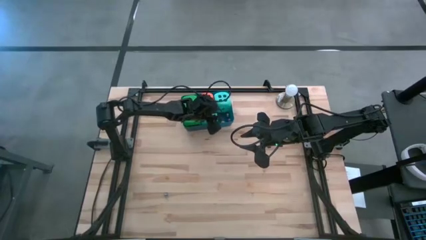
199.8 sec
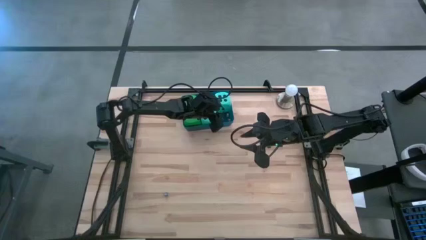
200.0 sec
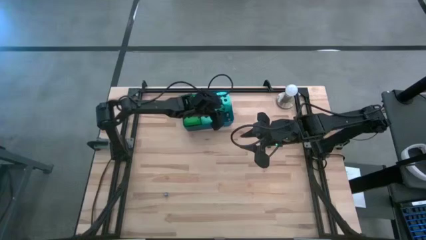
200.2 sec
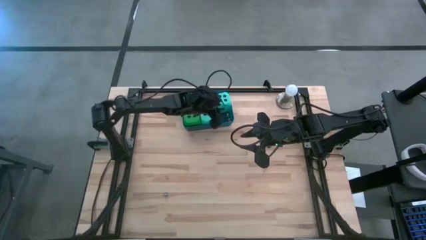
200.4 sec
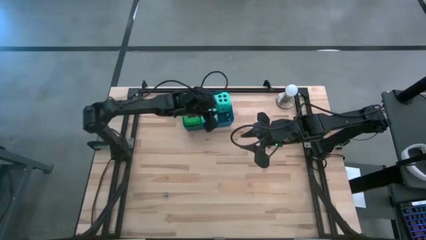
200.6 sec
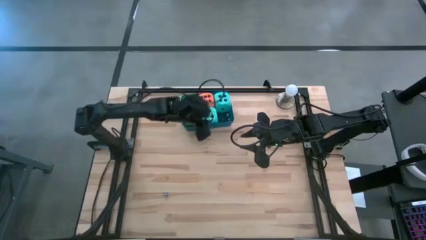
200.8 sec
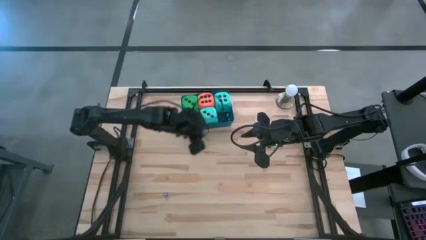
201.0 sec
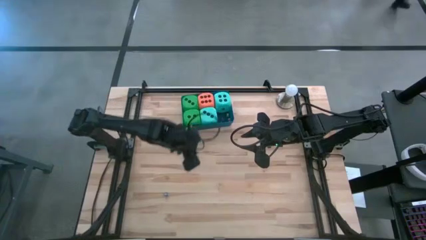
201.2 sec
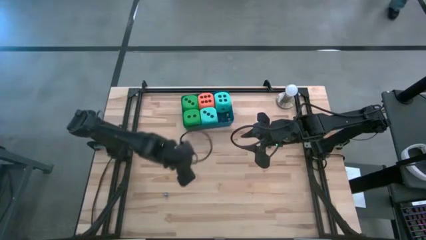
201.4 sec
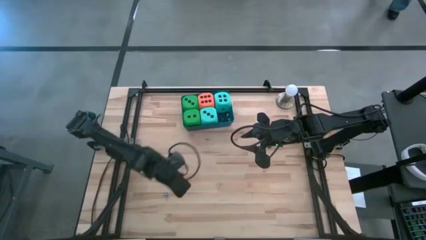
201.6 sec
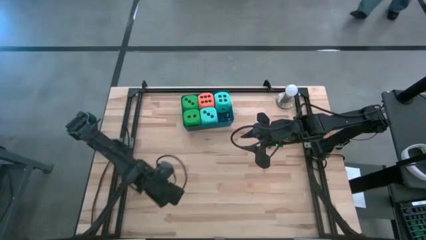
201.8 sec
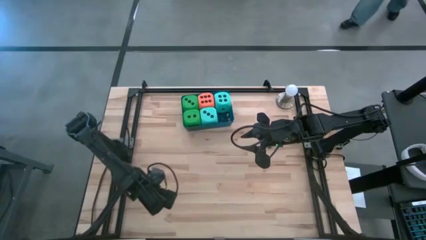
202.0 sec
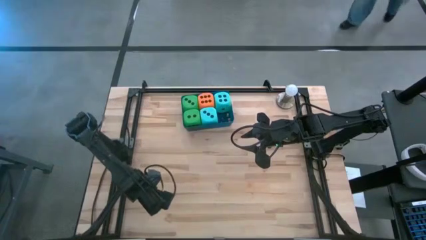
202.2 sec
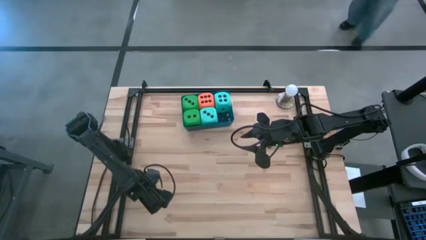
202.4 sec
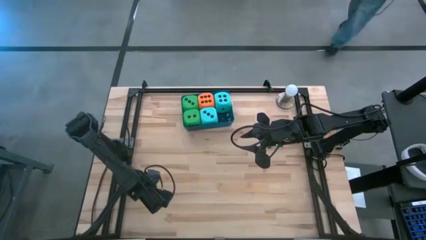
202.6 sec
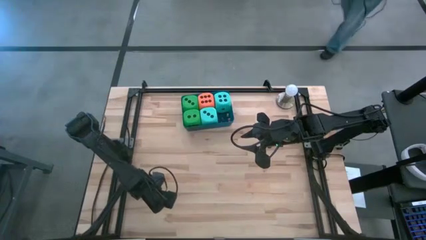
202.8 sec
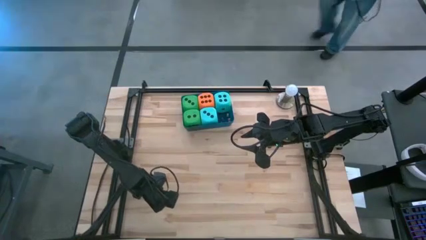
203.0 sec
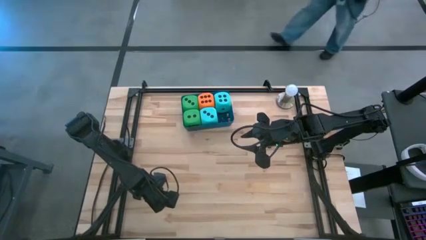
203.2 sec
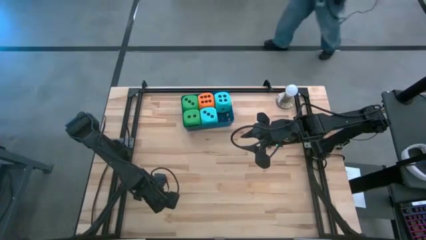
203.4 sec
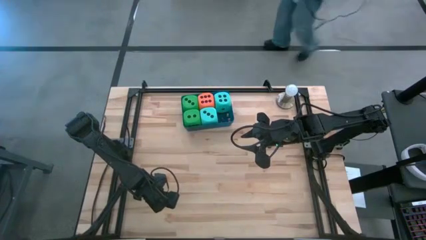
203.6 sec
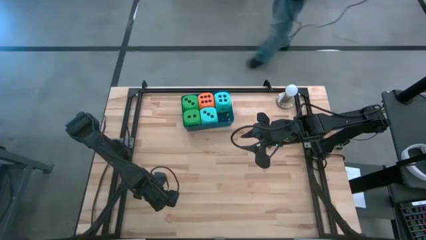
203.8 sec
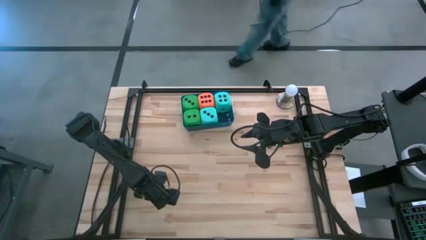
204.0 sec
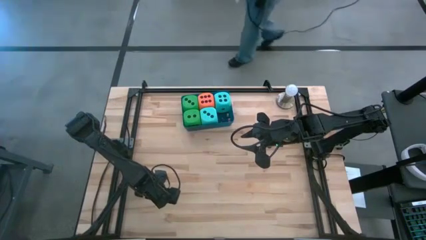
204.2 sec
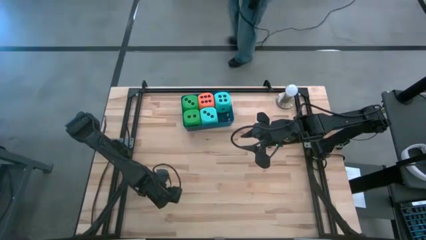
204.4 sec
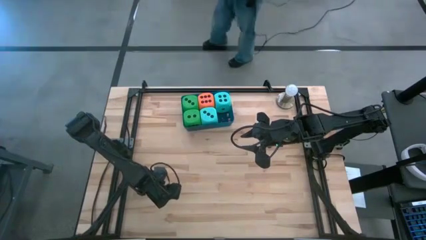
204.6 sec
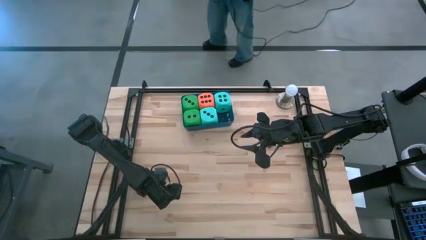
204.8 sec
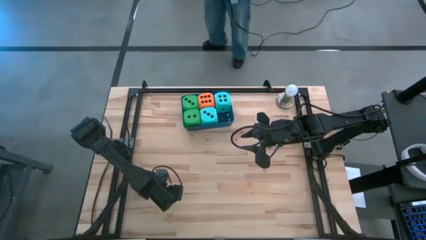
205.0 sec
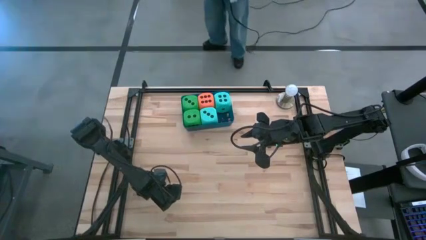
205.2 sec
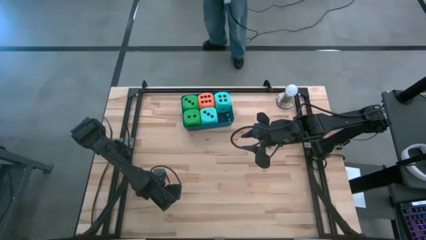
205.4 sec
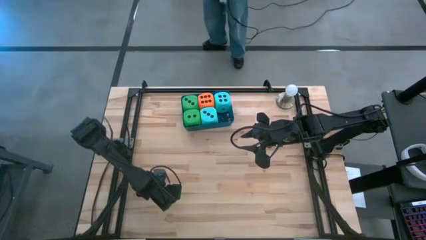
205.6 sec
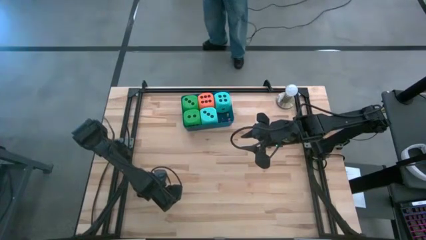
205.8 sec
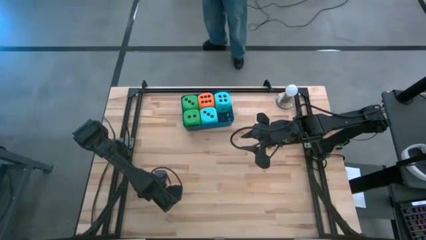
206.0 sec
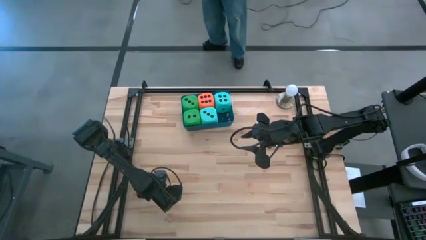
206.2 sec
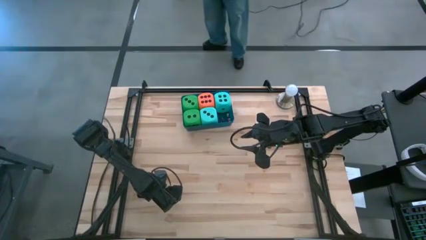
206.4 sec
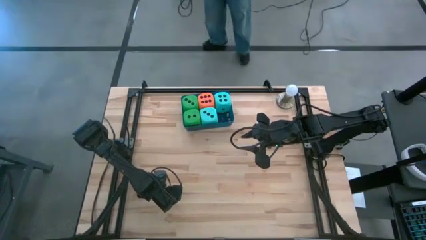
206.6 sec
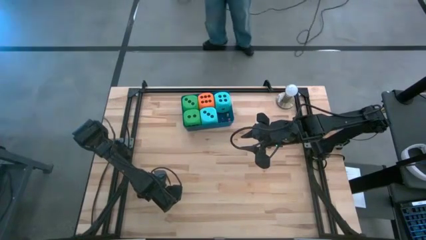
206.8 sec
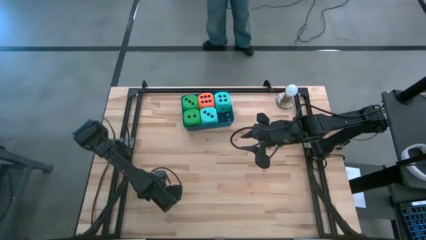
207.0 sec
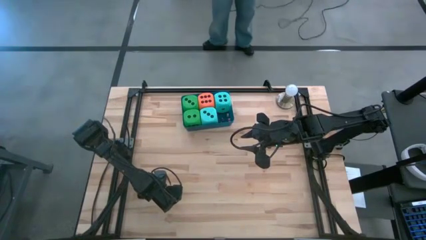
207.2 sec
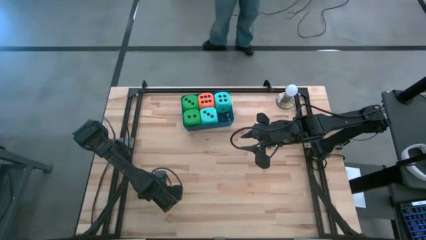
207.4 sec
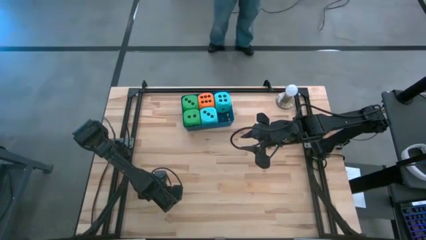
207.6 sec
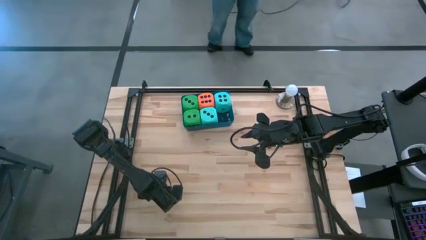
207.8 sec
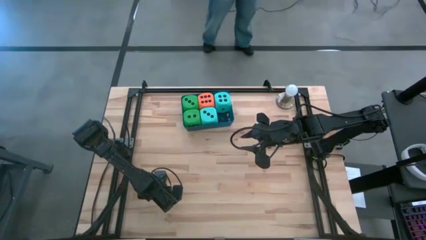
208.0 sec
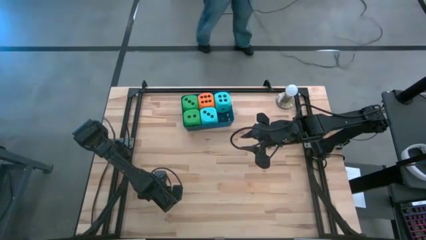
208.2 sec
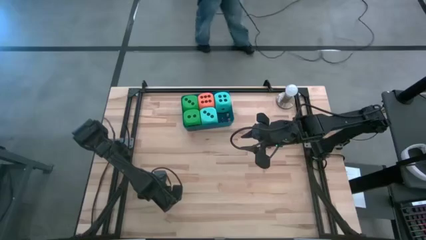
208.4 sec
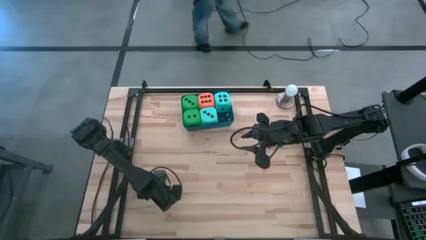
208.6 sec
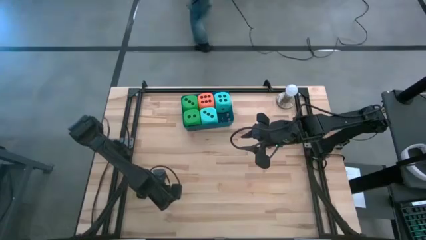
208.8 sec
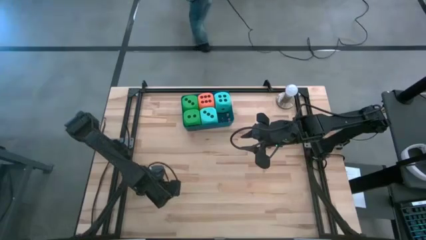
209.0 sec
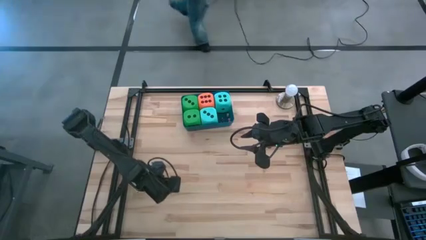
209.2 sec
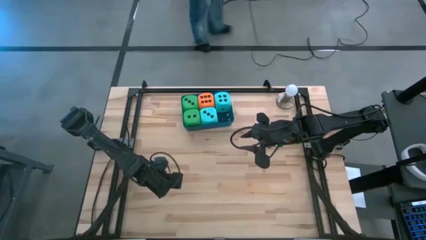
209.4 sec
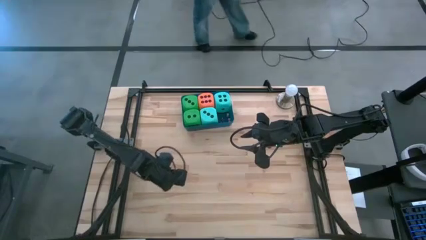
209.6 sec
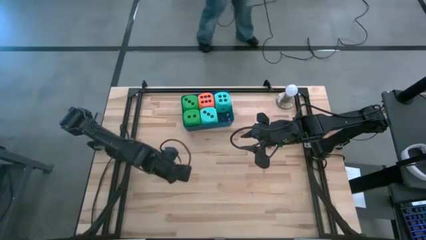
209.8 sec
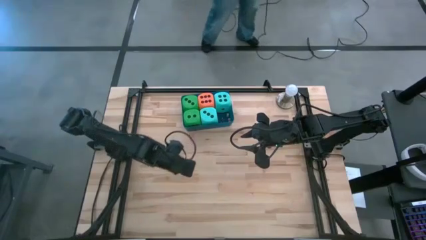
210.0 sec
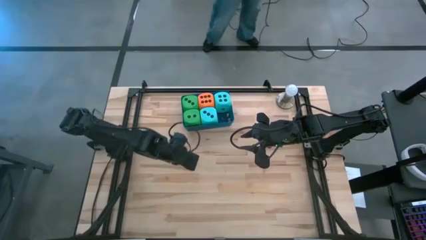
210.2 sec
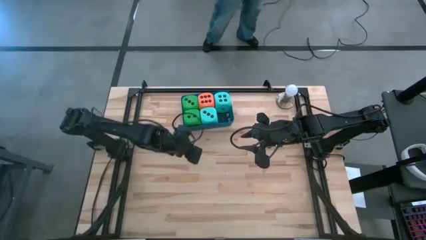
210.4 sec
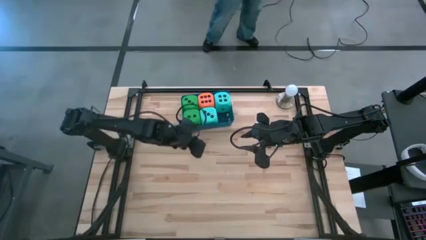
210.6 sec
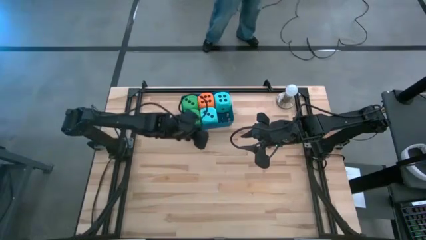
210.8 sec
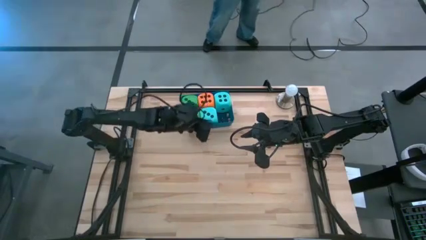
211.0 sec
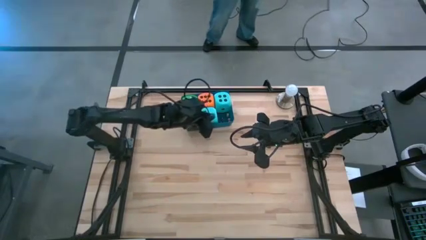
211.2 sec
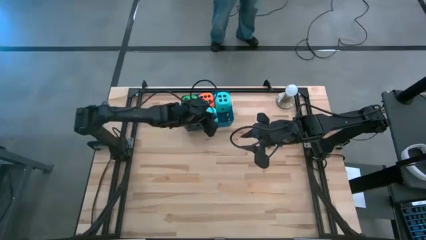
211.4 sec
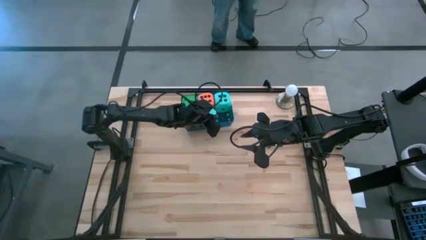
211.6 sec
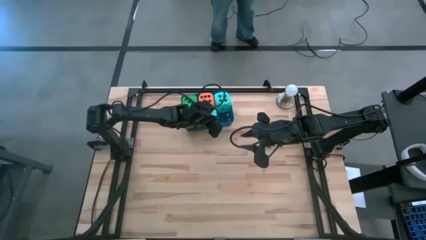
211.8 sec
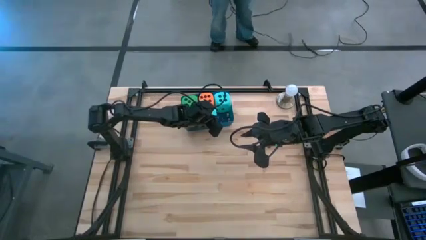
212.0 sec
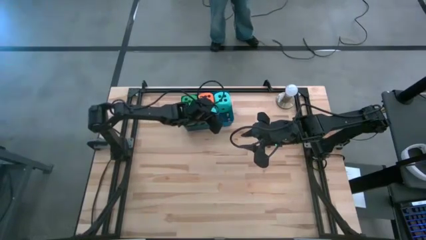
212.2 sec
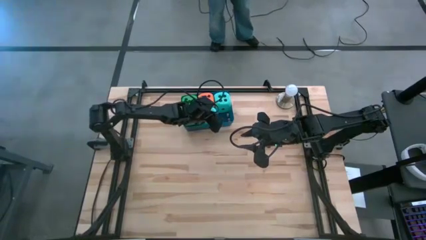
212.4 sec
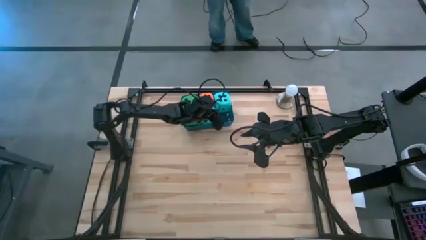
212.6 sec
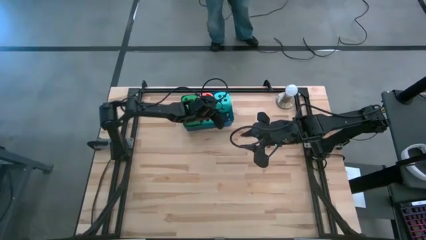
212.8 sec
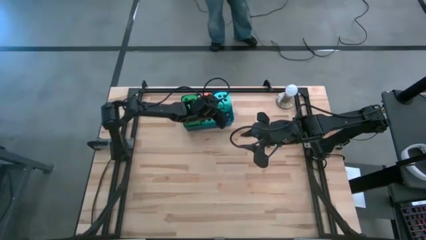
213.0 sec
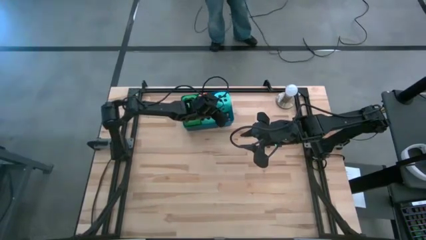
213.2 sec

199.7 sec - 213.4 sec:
Task: Pick & Place Dice
Put the small blue dice into the blue bin
